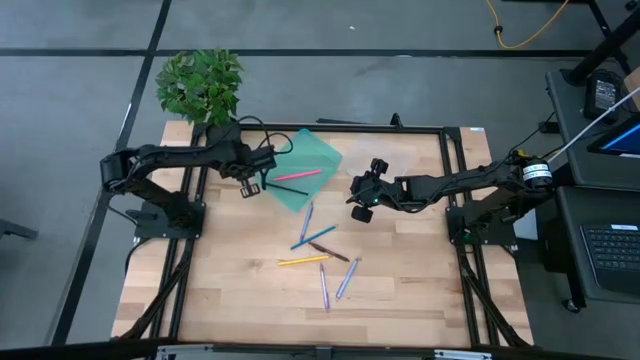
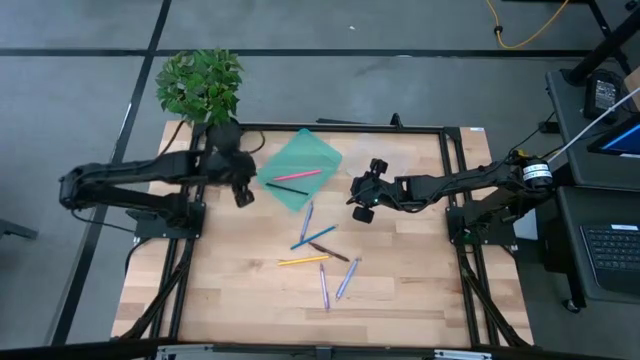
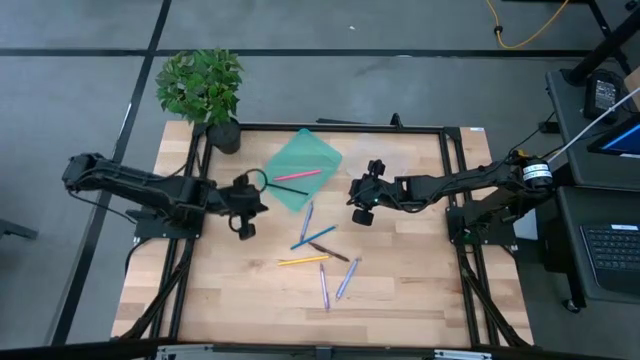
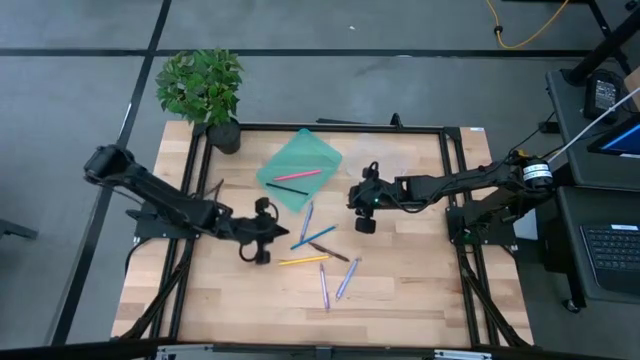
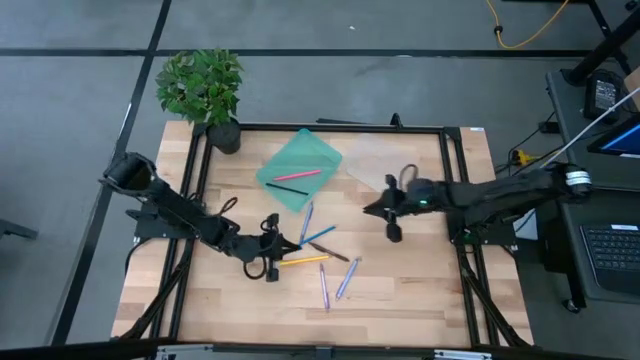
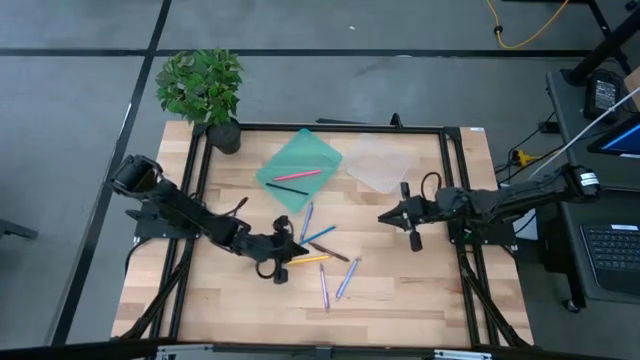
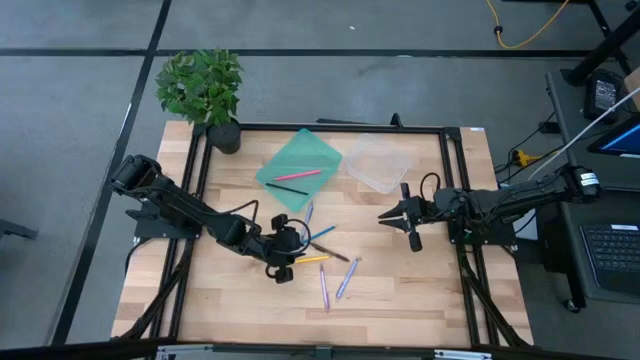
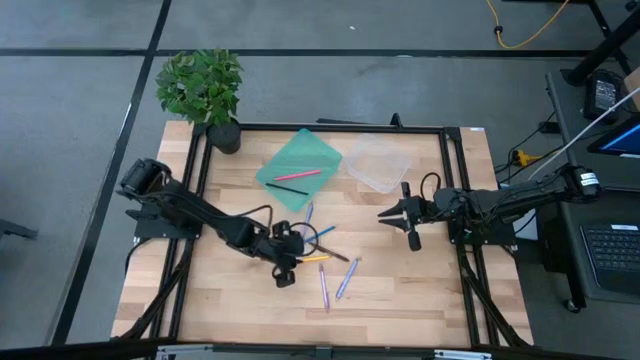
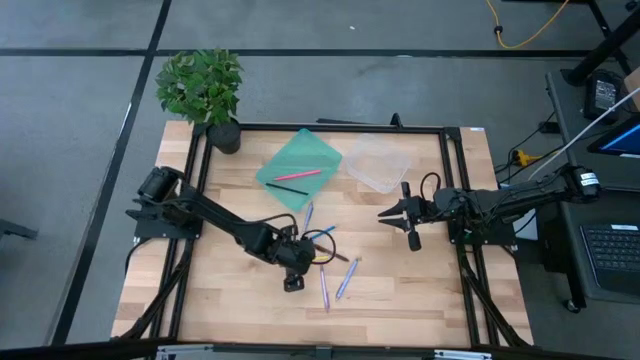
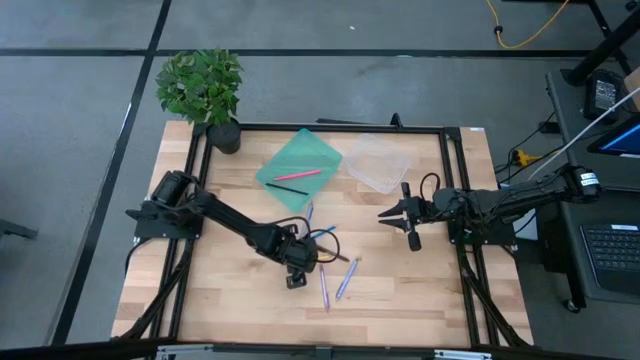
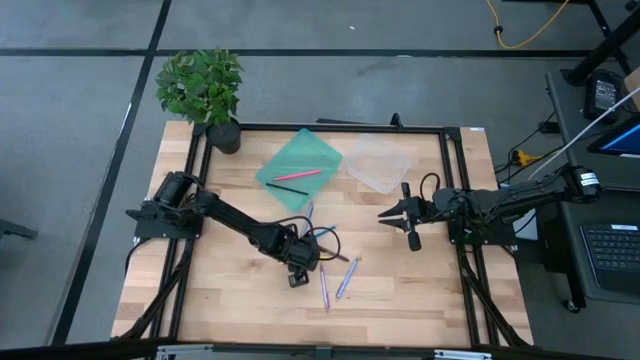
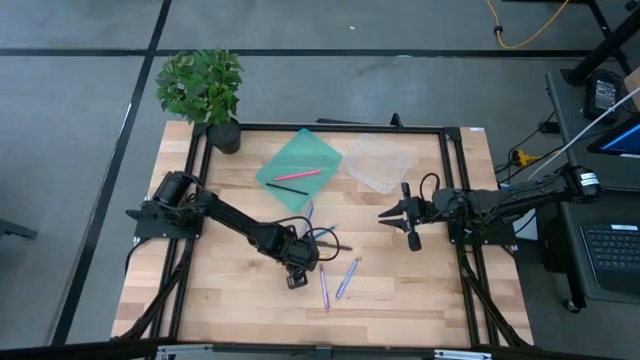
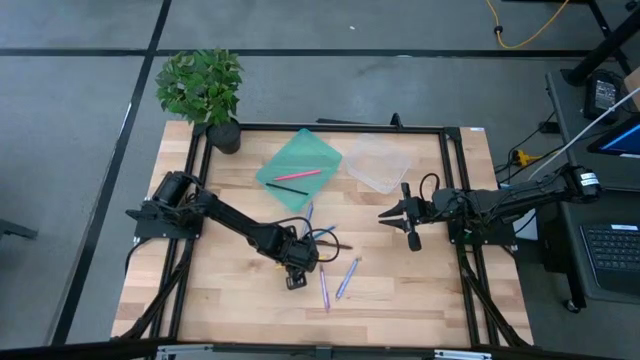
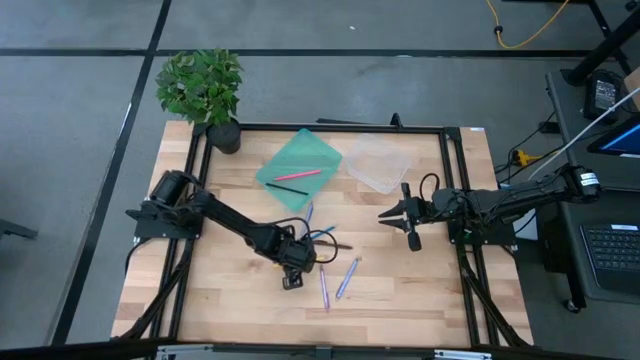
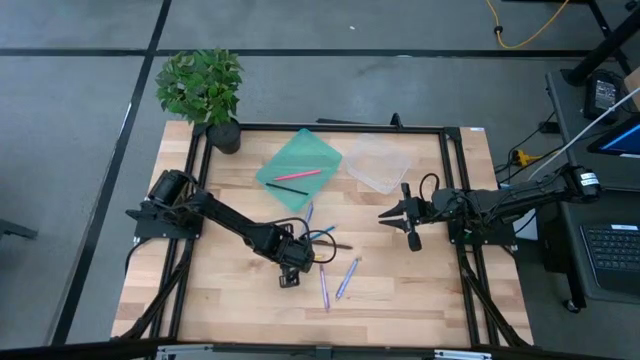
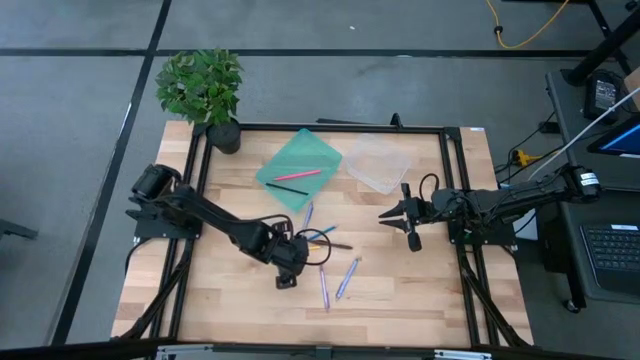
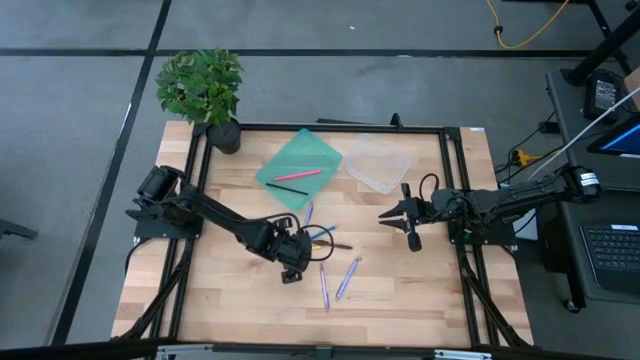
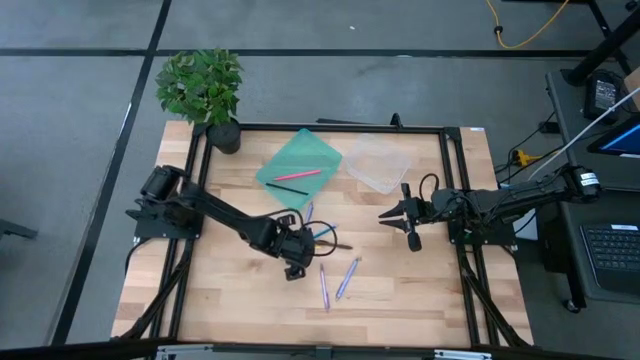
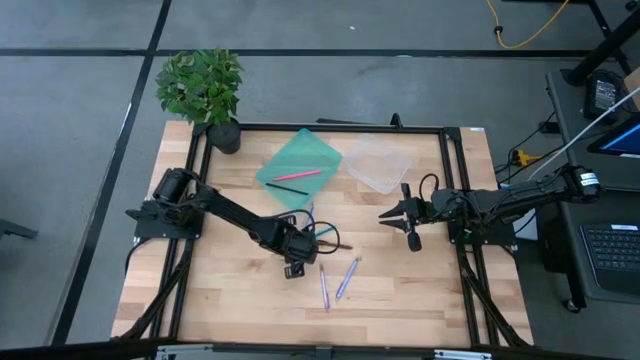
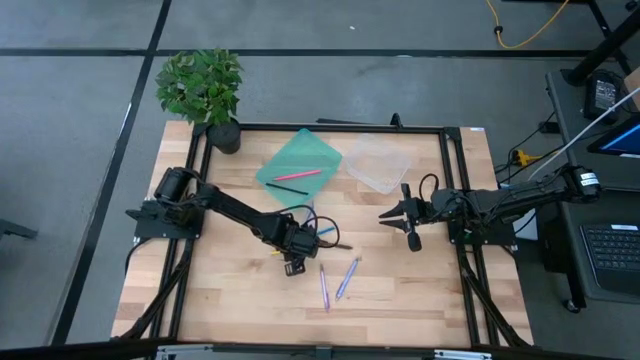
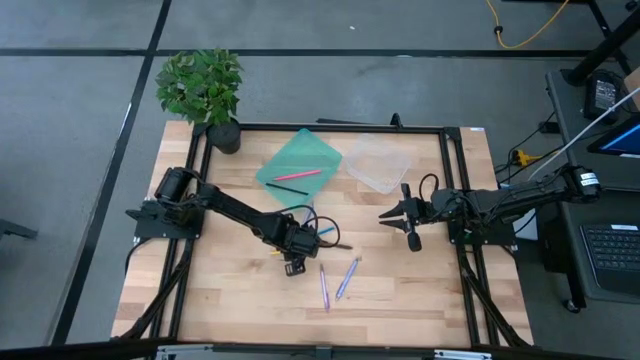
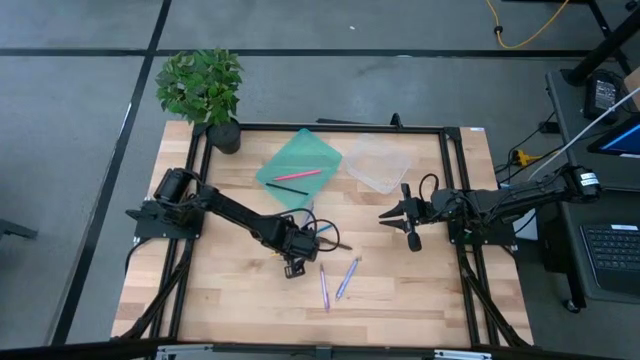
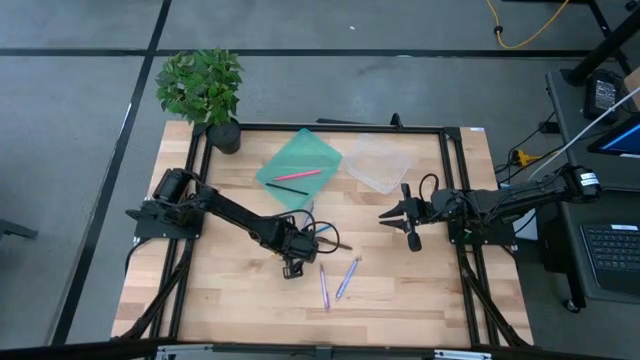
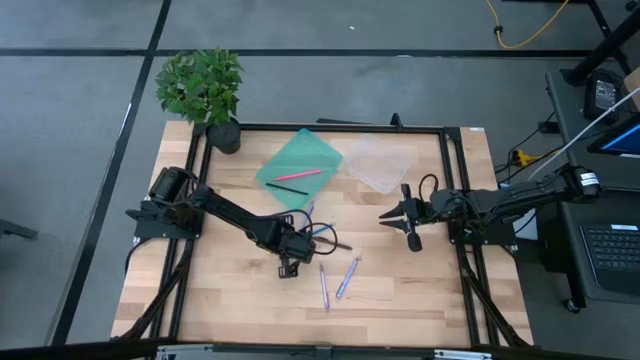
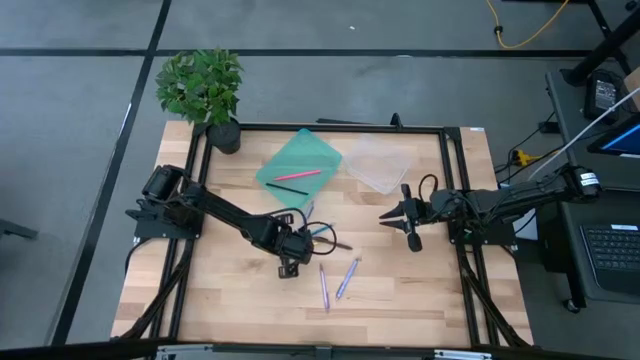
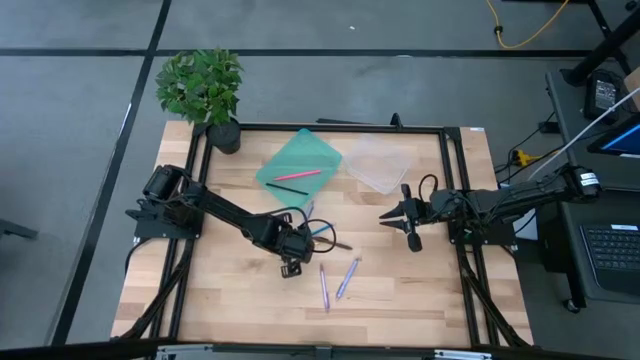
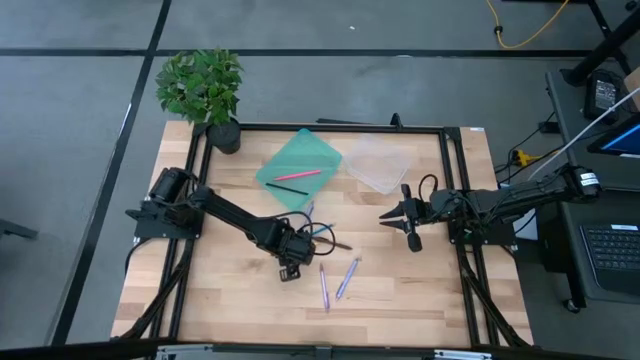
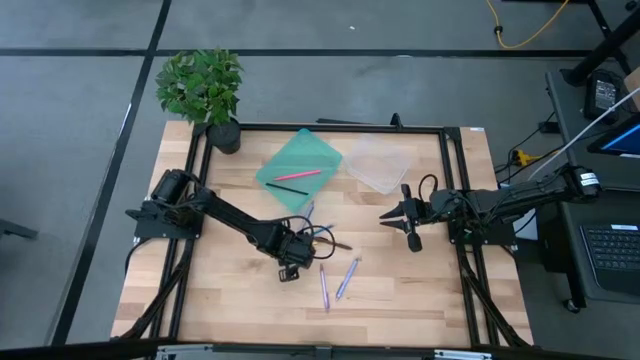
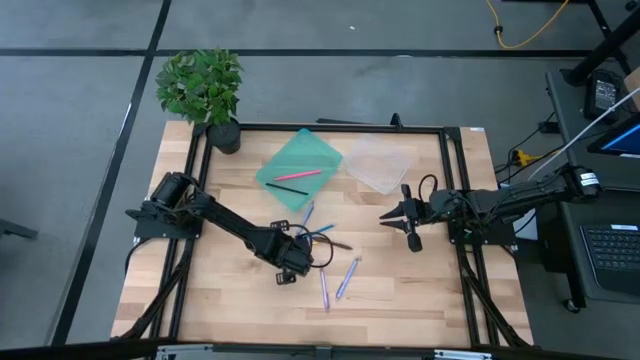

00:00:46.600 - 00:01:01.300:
Task: Sort pens & pencils
Put the yellow pencil into the blue bin

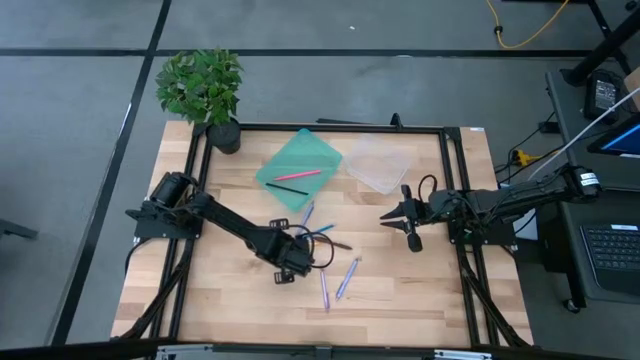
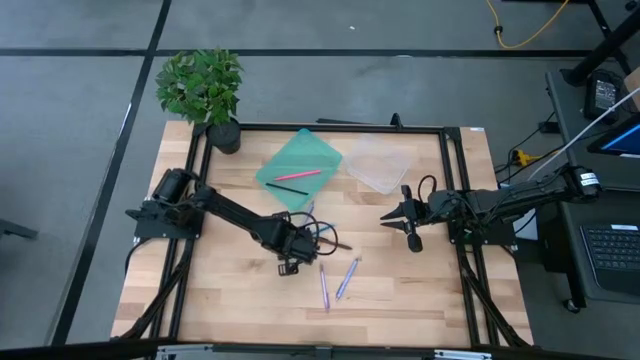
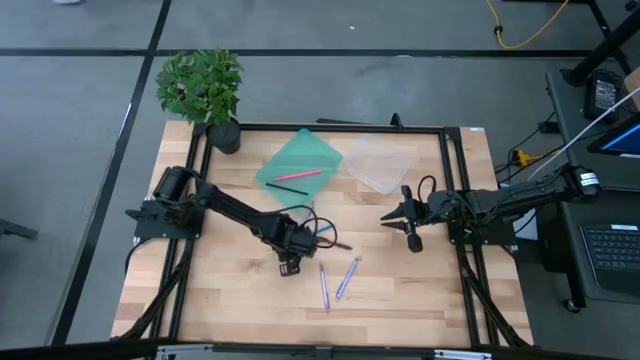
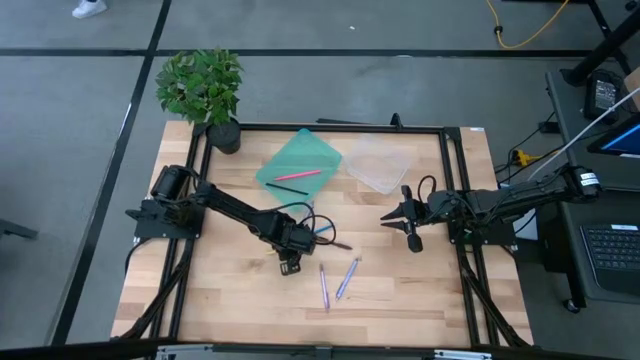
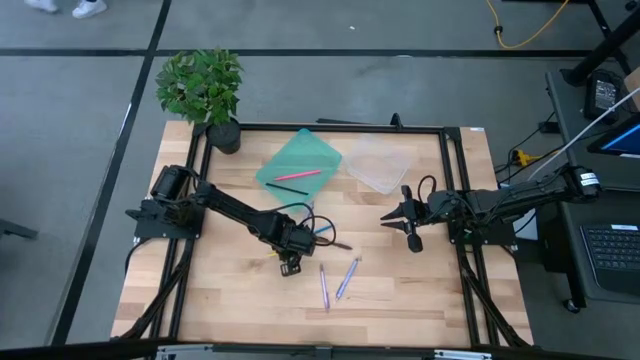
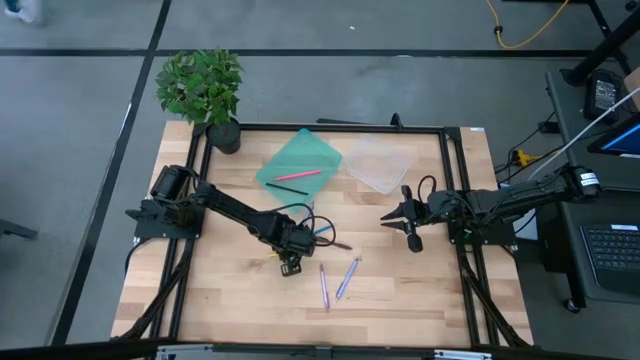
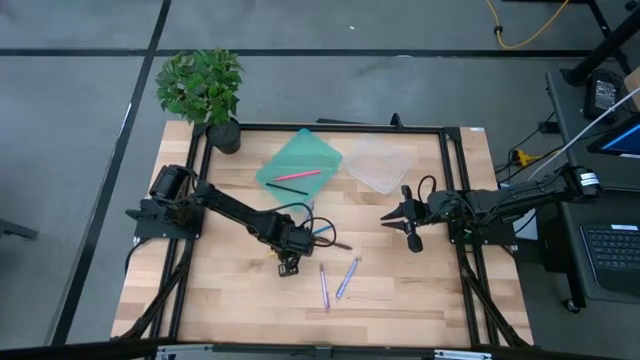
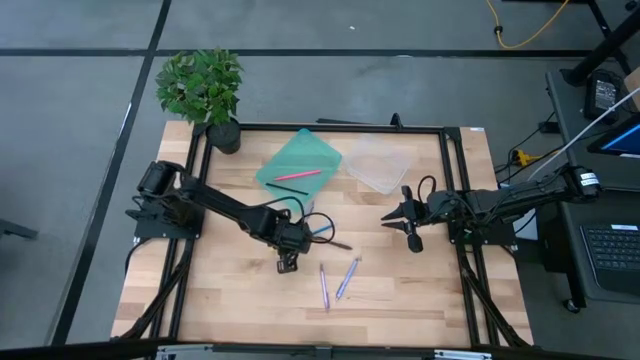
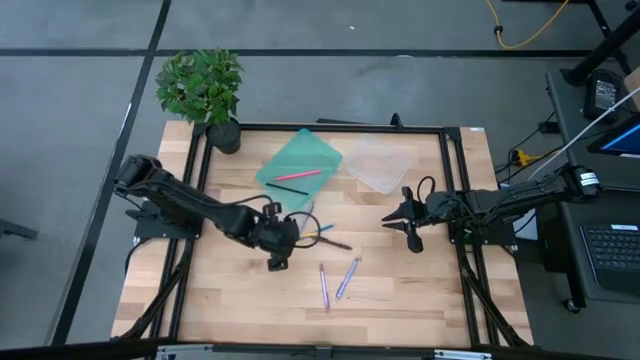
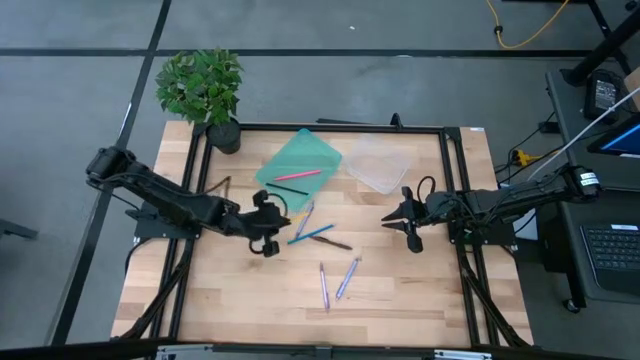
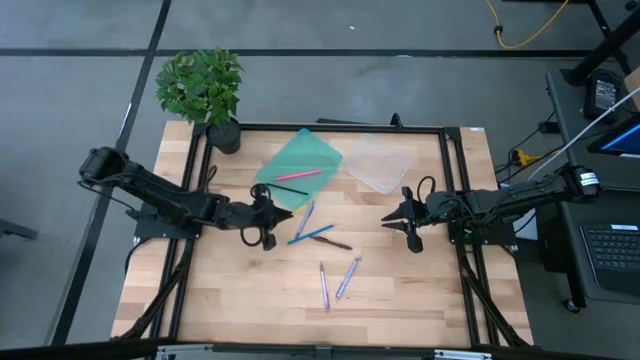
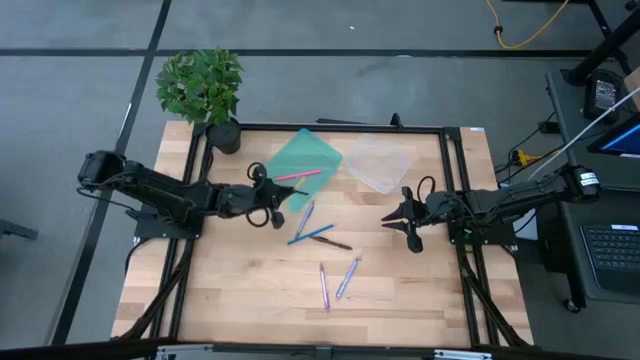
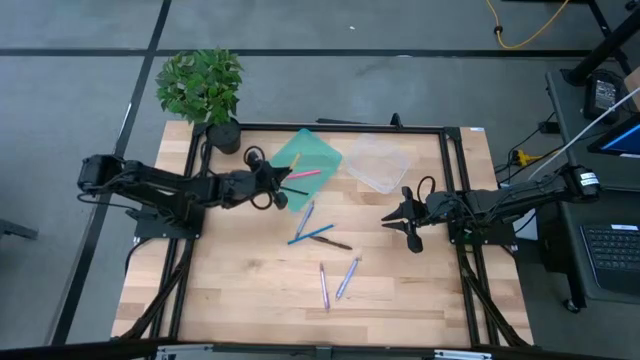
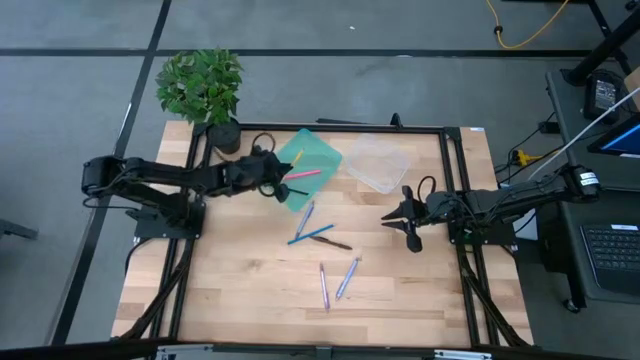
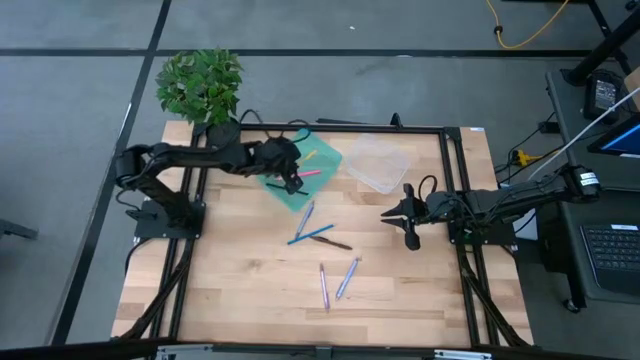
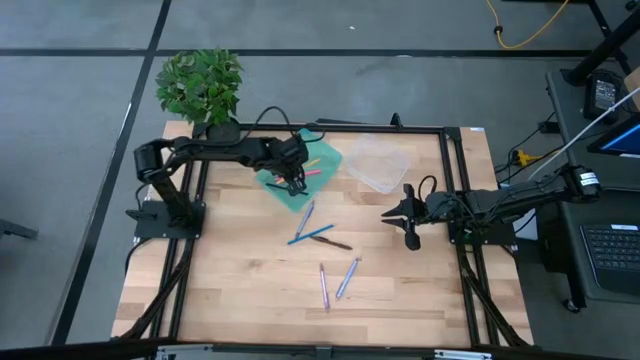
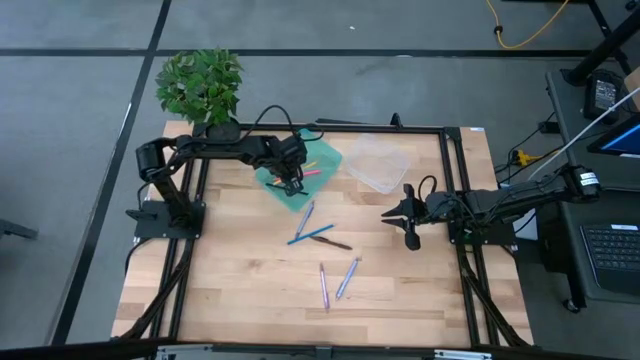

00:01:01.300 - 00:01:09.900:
Put the yellow pencil into the blue bin
